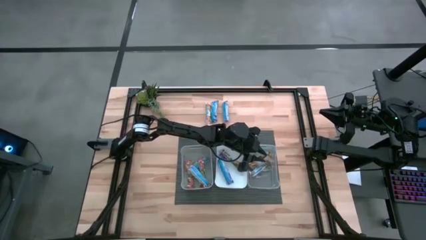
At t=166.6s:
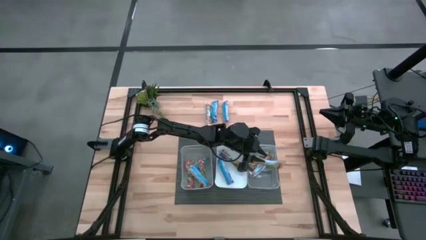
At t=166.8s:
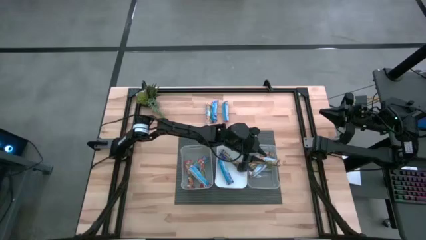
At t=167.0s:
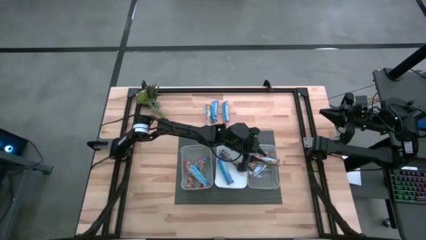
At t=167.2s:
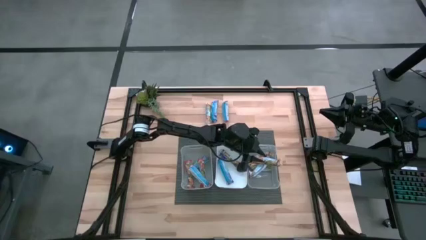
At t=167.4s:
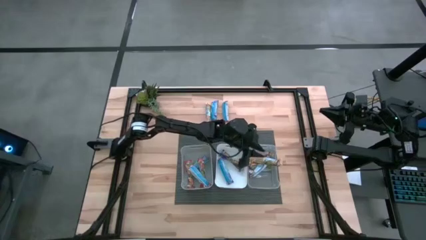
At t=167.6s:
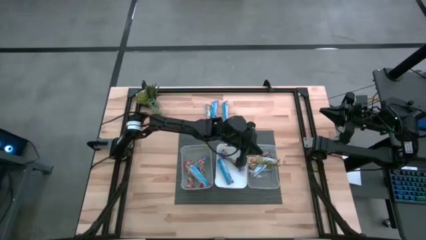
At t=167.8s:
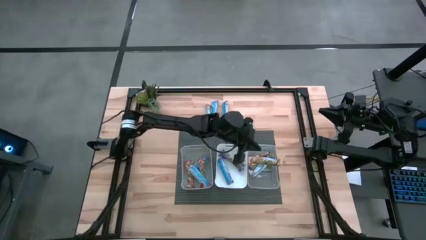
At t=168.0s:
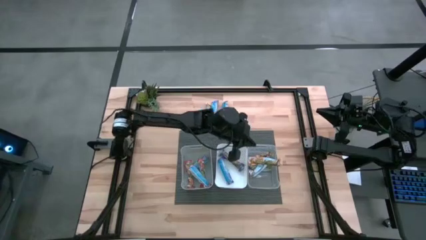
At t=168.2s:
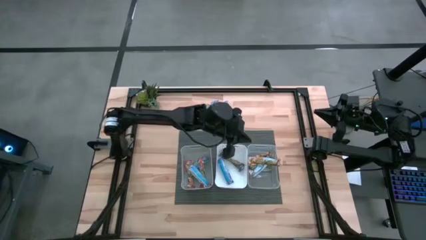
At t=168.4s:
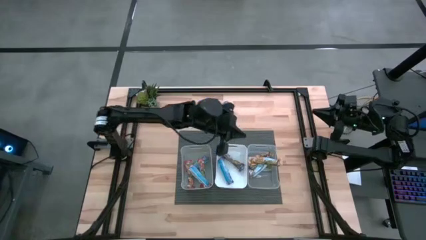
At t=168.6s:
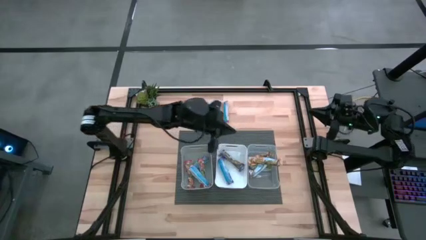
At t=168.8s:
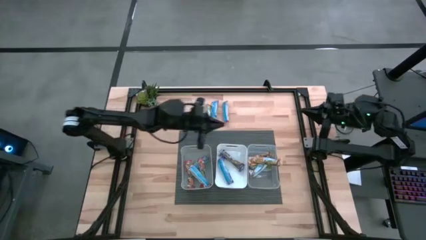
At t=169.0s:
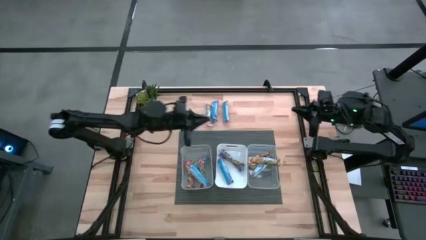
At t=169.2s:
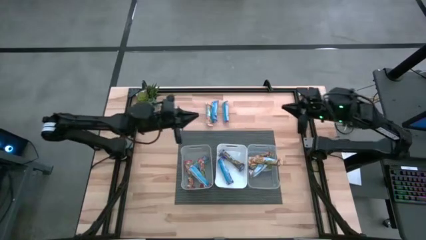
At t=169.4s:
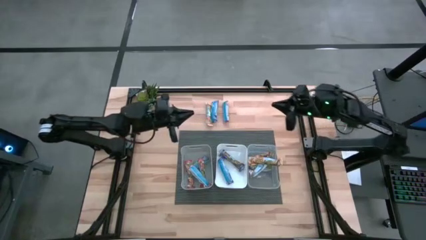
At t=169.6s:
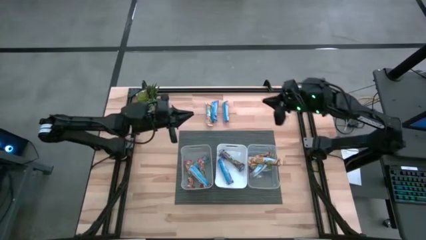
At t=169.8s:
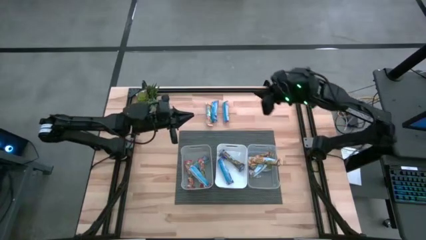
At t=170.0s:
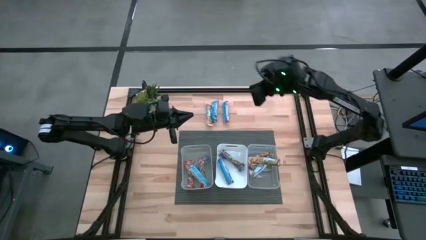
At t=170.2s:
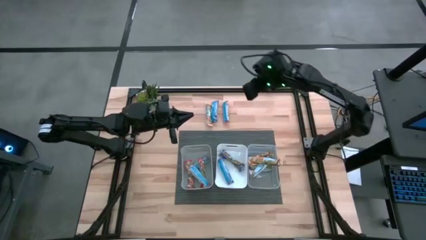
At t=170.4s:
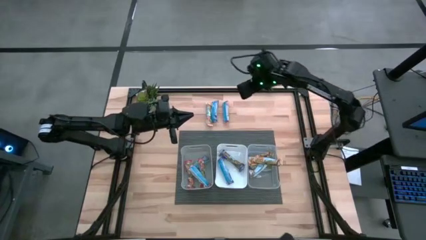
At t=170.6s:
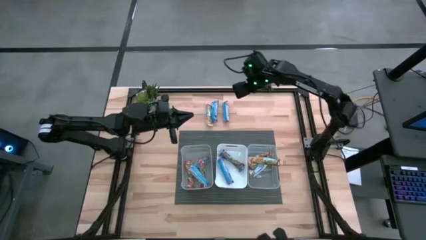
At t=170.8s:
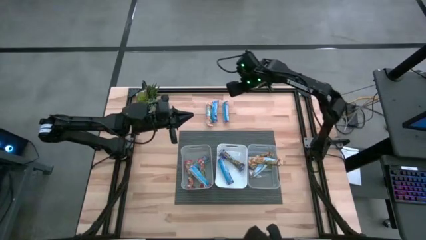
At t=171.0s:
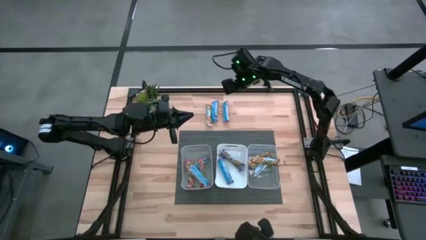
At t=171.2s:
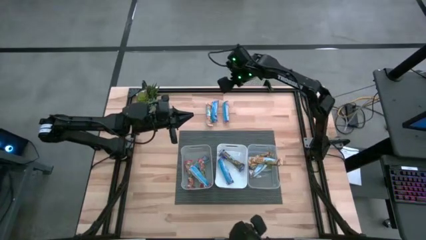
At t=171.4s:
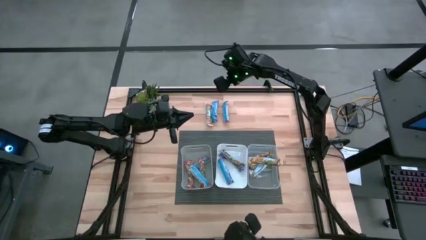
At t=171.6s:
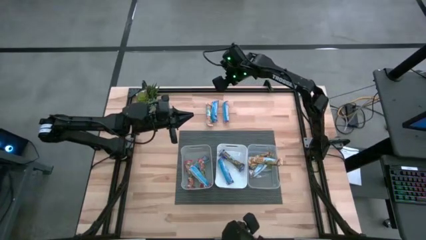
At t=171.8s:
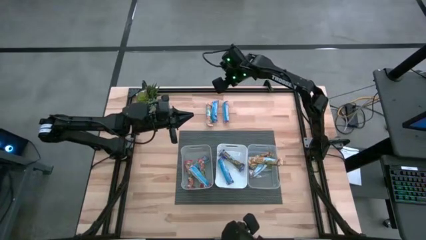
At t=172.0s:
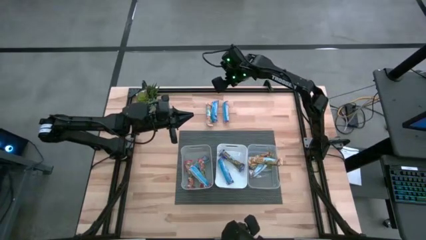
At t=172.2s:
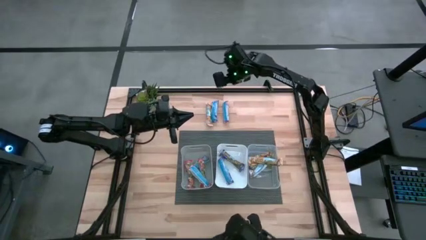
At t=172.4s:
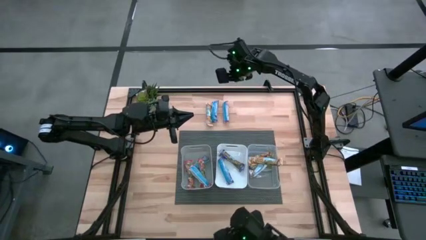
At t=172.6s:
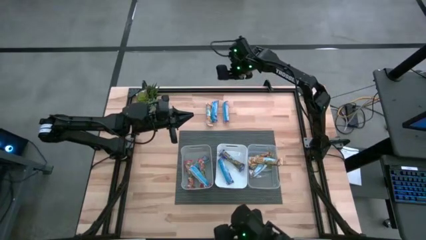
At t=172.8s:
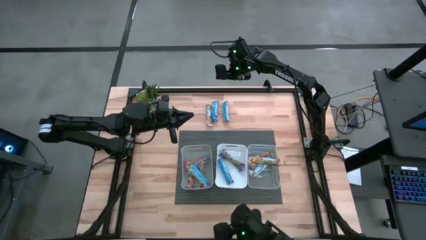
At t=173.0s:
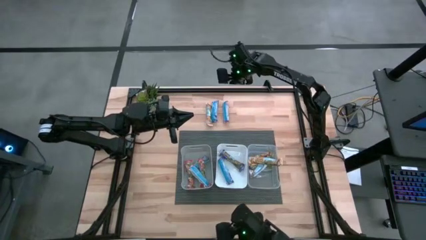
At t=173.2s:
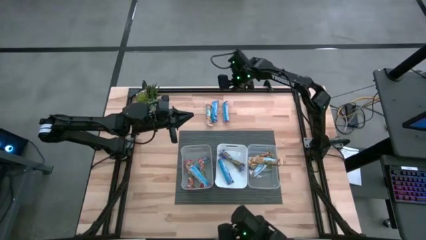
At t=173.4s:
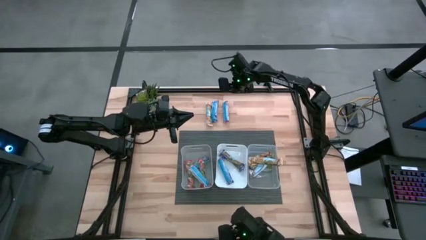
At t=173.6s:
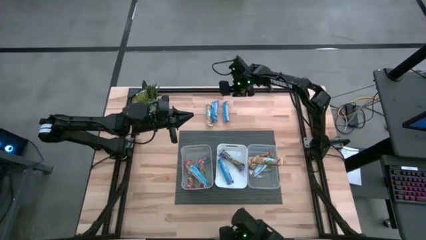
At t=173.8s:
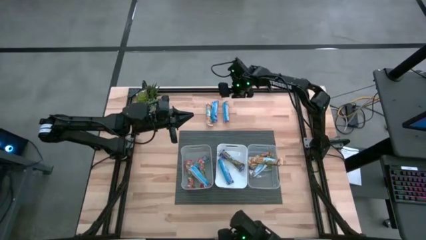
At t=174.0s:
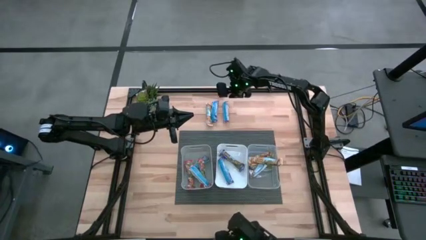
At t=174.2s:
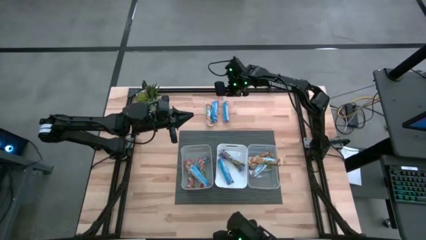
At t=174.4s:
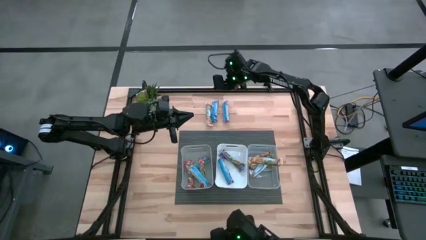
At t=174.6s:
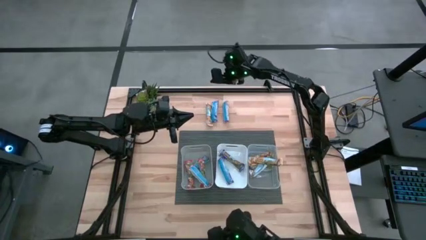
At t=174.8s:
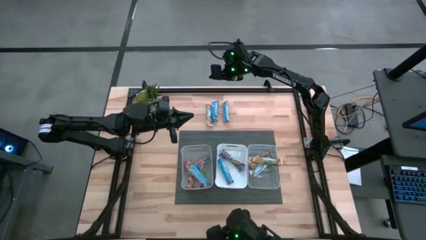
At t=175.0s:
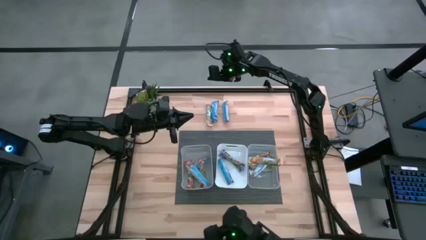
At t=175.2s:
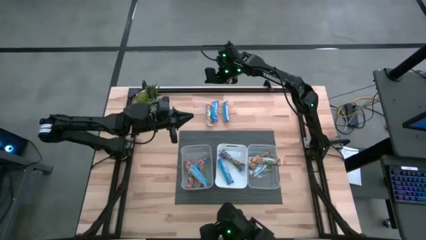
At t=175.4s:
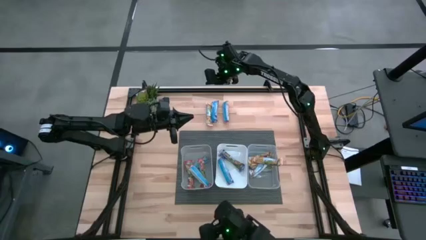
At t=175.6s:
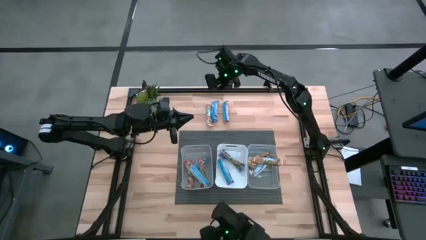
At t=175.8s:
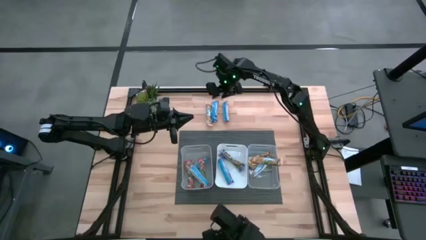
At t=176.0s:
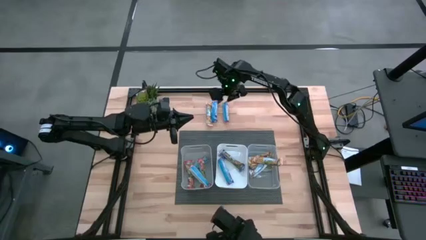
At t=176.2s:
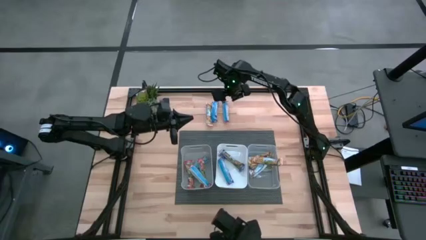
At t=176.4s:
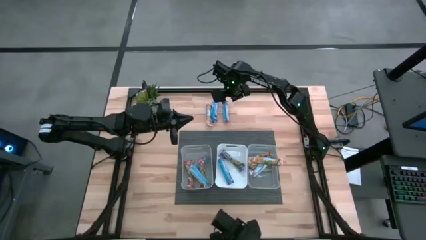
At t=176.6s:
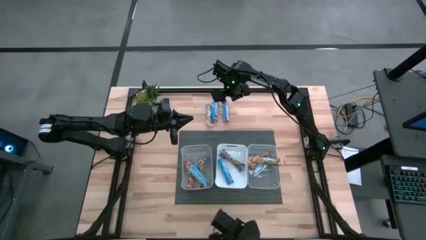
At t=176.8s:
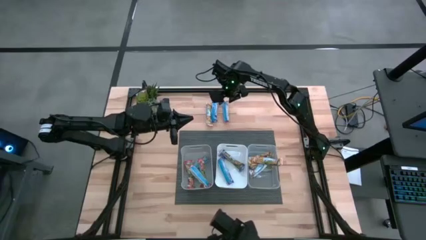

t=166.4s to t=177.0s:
Task: Pick and place Granola Bars by type
Put the red granola bar into the gray bin

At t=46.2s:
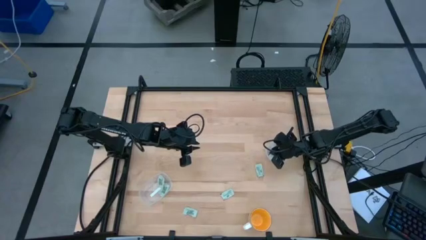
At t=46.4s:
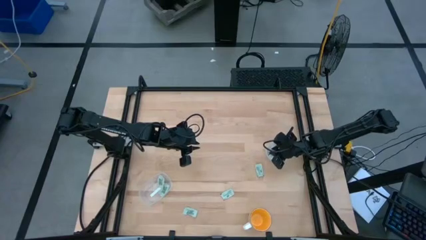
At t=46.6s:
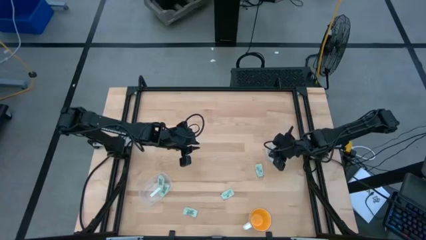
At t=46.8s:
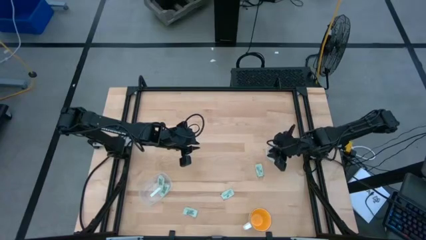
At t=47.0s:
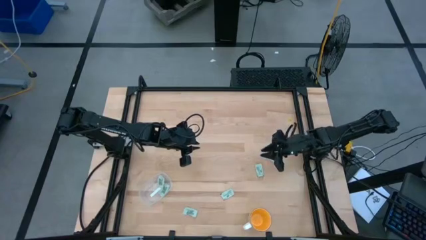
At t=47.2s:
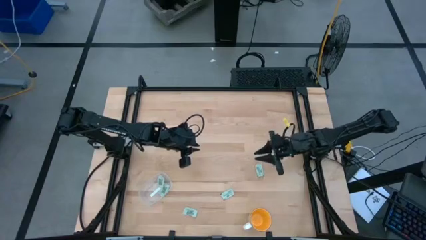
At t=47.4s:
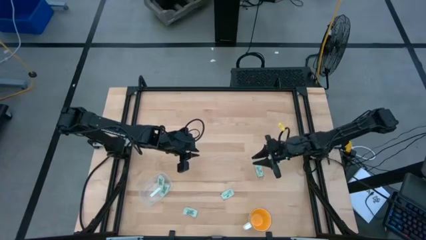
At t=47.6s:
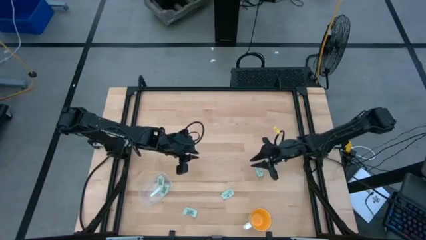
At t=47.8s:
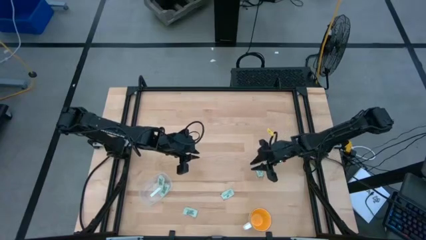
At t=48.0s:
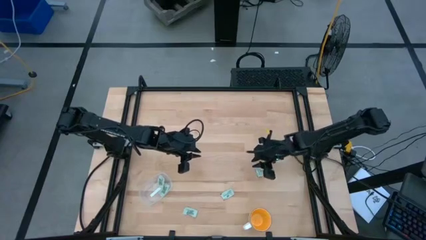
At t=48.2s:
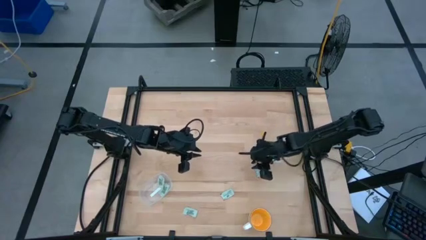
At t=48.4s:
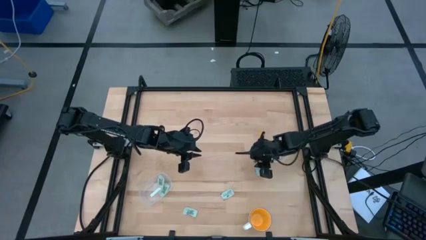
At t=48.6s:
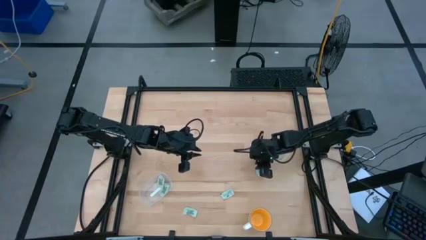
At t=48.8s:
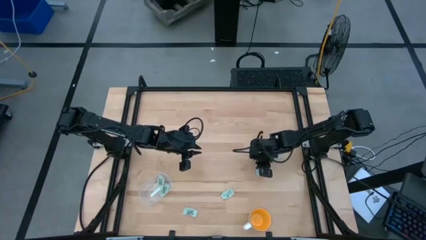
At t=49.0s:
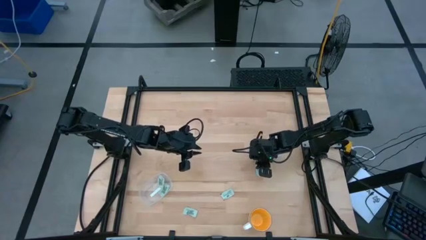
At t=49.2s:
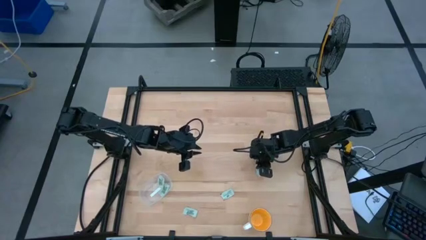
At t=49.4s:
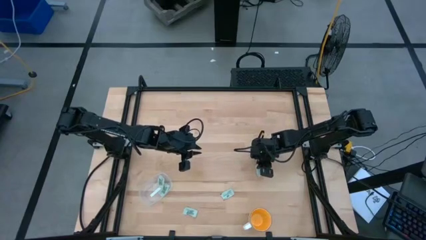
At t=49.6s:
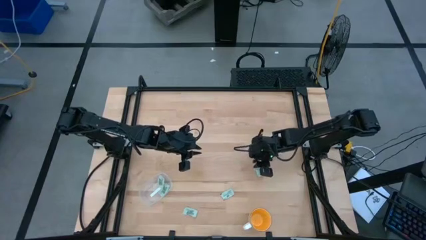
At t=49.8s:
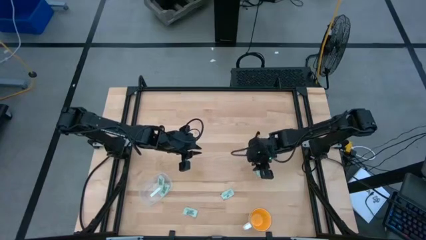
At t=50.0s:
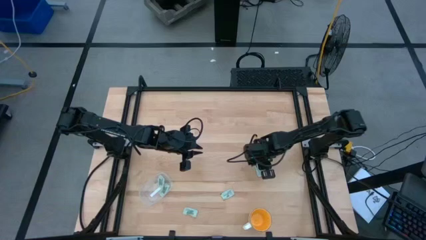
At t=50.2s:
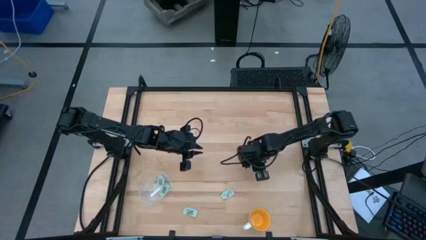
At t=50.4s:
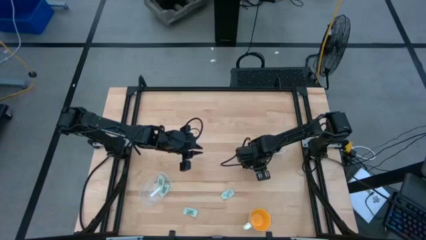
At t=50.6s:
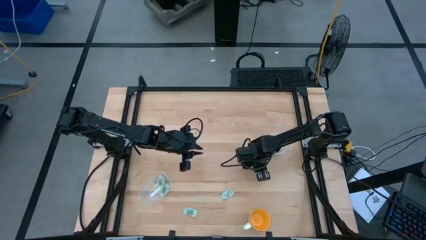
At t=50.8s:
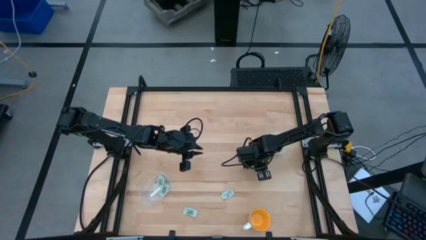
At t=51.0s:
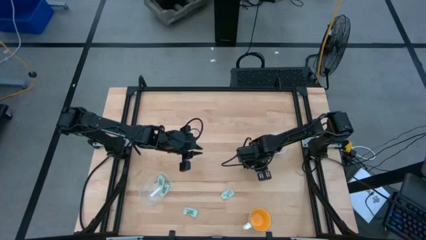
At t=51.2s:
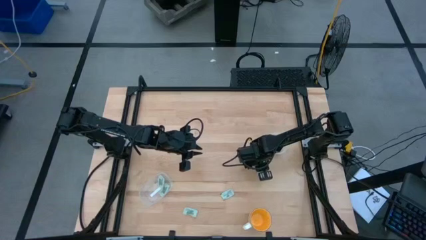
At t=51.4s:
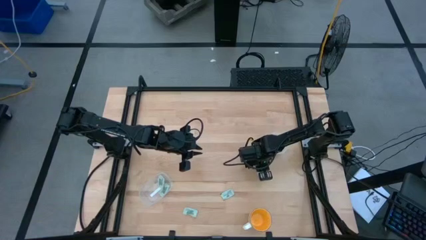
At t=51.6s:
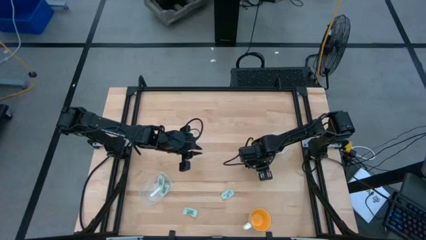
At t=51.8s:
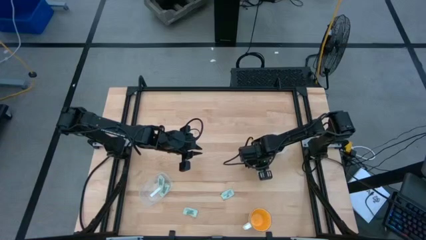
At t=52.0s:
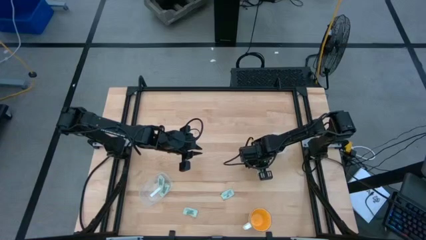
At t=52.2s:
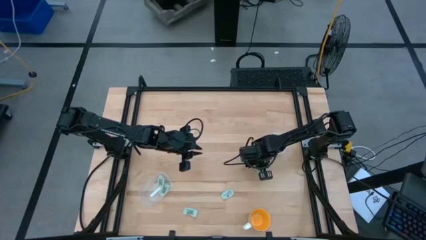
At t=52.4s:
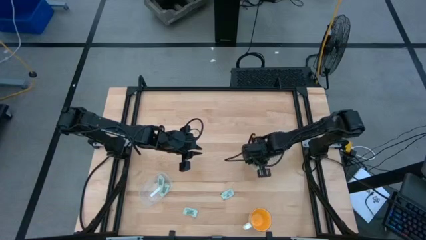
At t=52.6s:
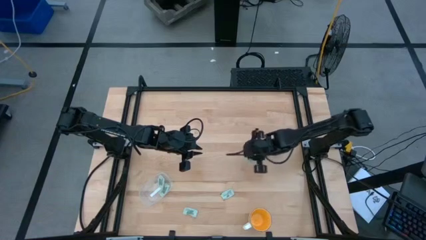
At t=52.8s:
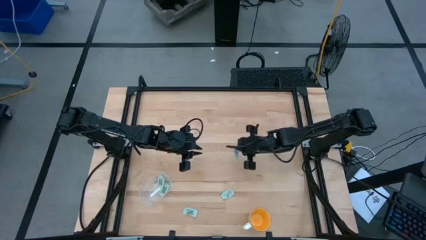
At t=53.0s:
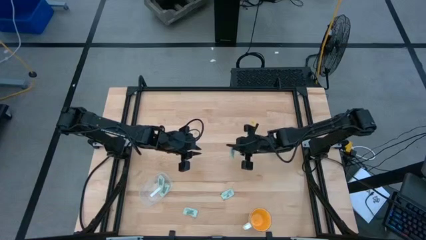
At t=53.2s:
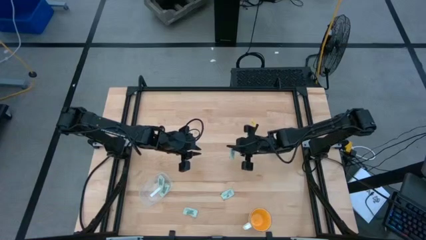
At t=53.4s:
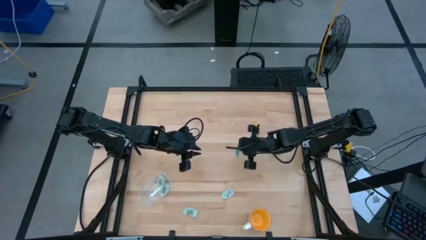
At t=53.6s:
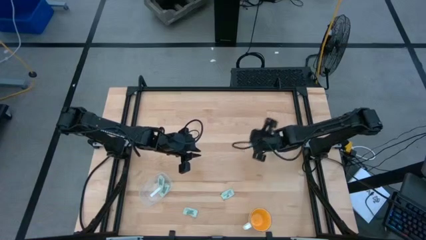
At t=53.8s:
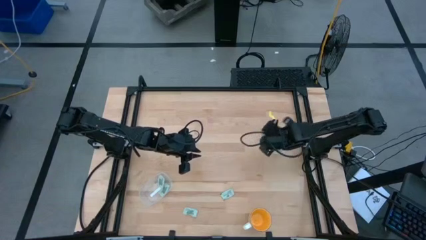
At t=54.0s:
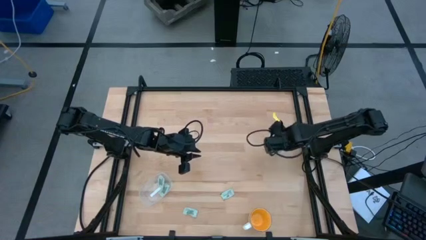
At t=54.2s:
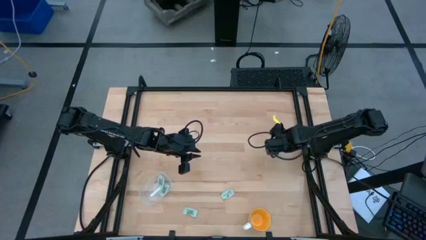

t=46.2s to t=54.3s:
Task: Pick and place Stevia / Truvia into bins
Put the white stevia packet into the circle transparent container
